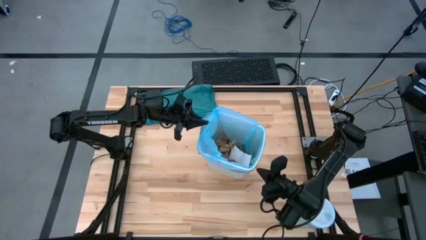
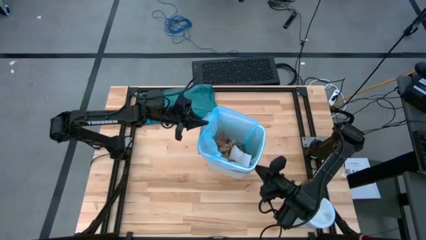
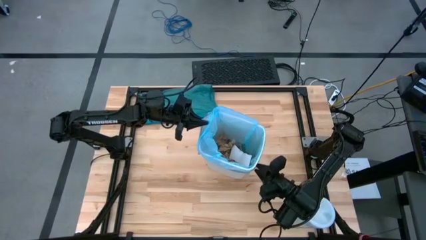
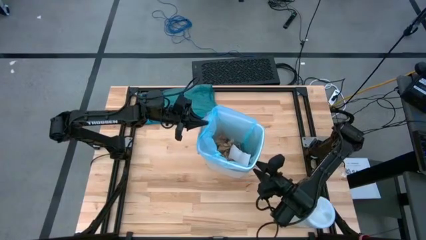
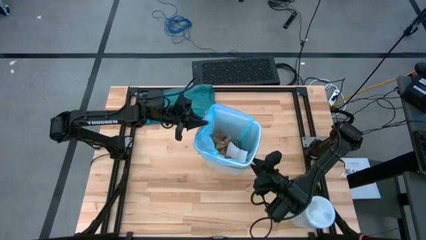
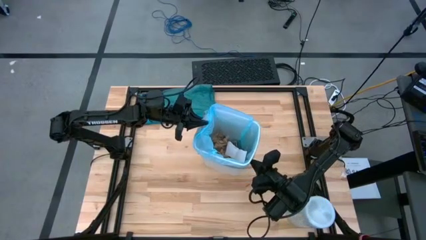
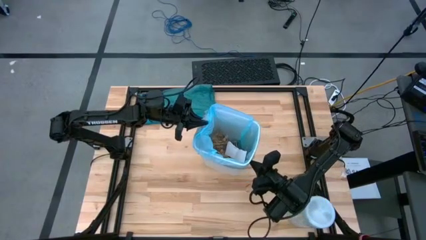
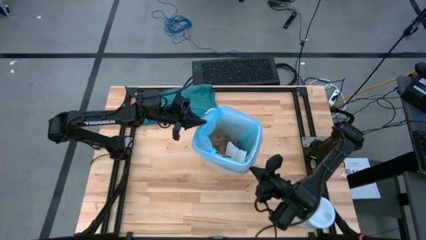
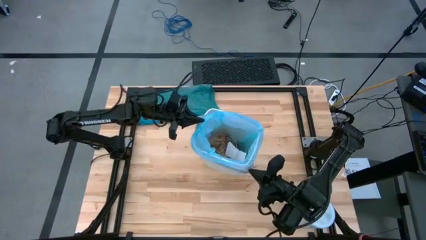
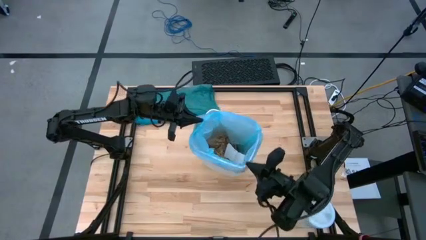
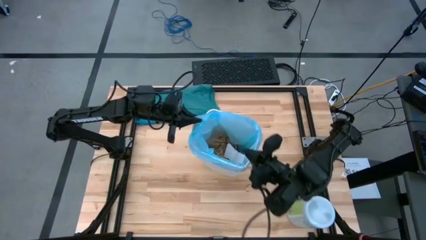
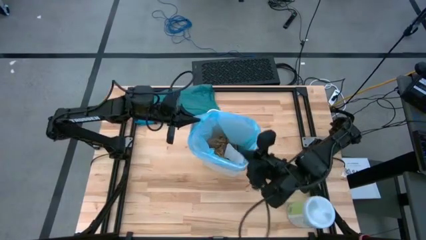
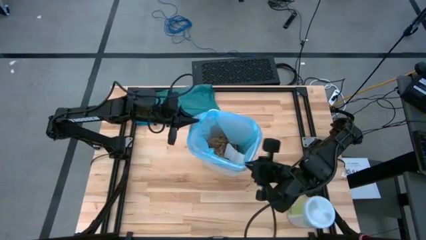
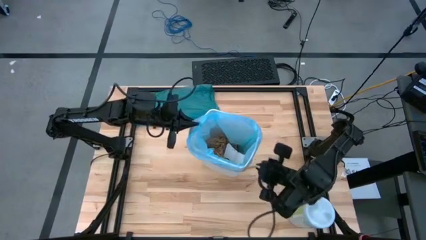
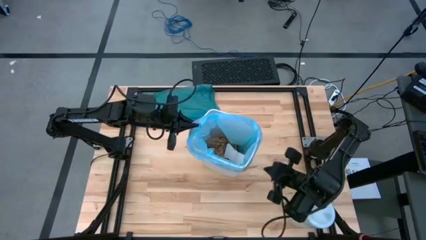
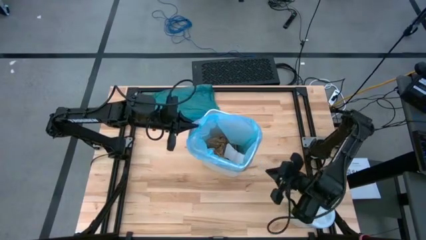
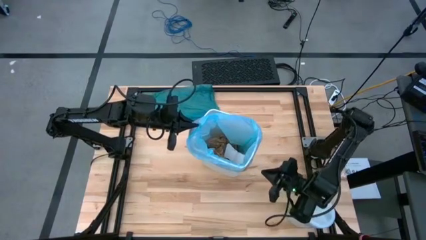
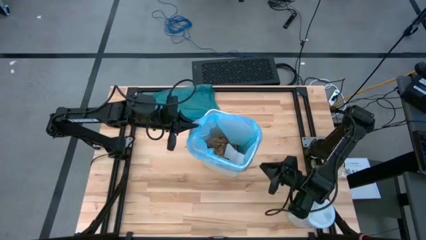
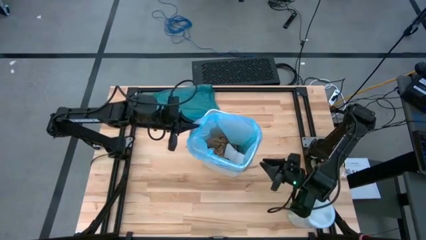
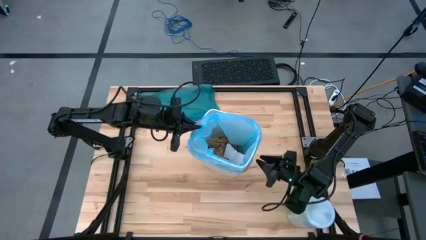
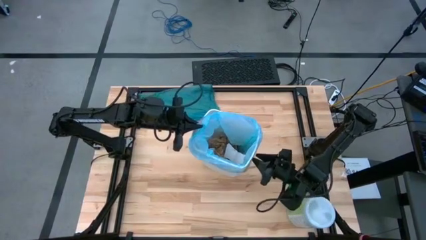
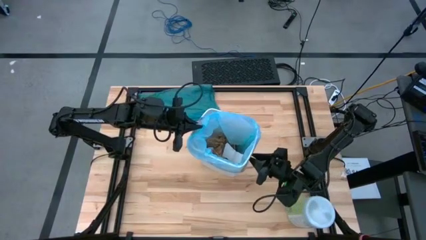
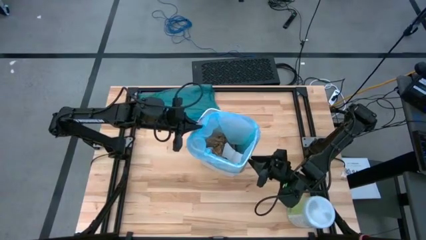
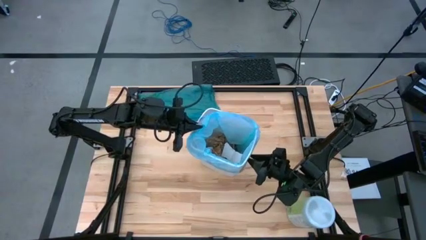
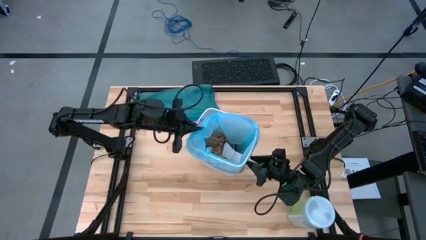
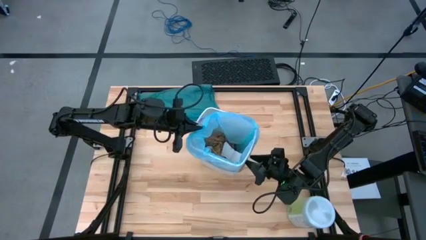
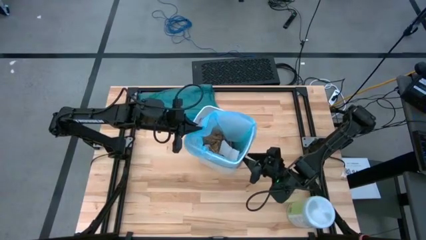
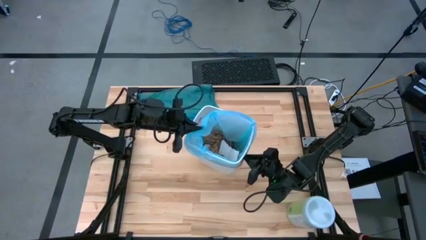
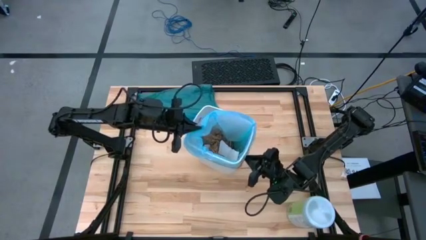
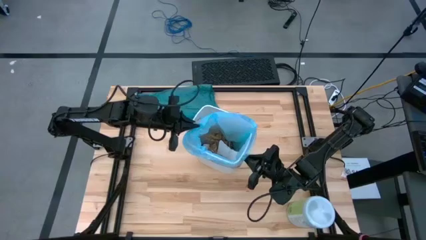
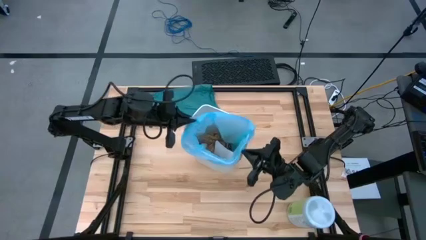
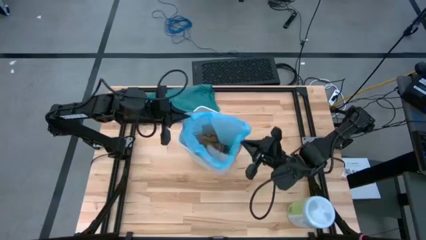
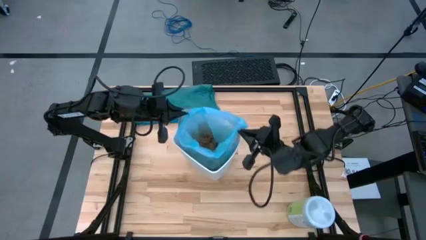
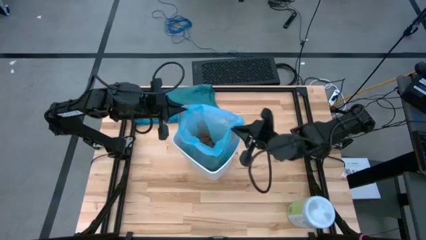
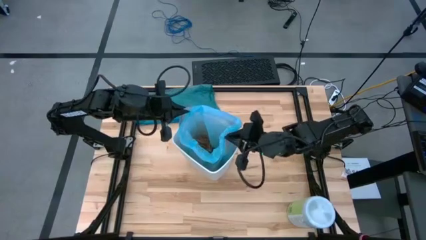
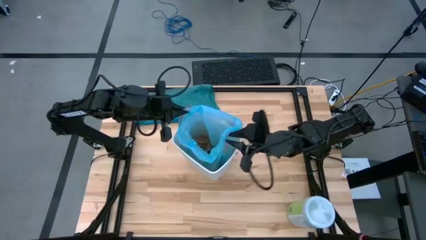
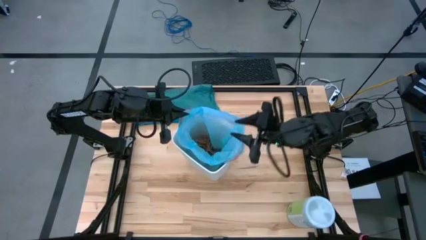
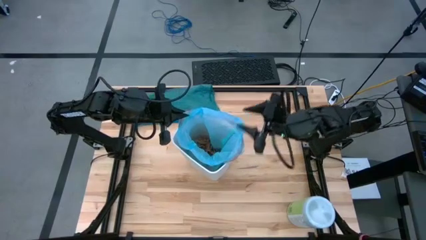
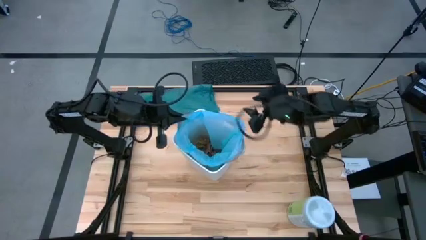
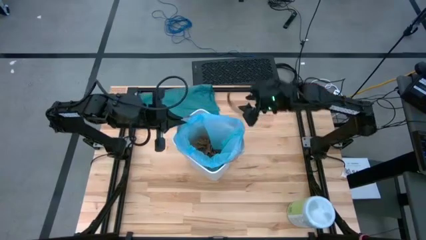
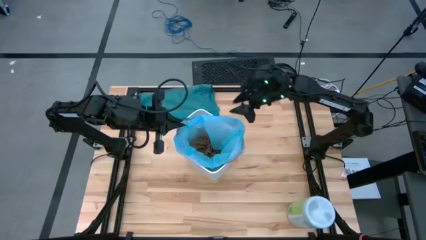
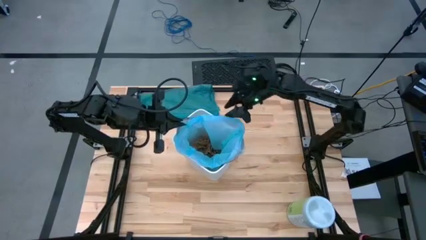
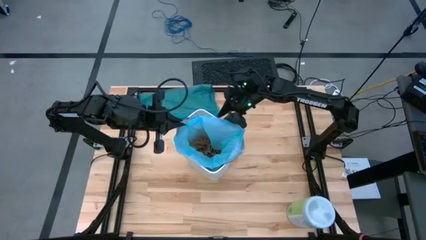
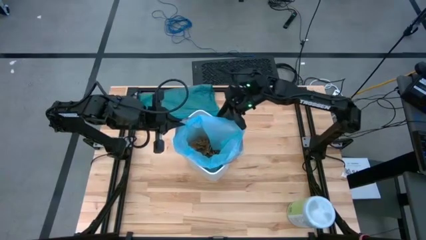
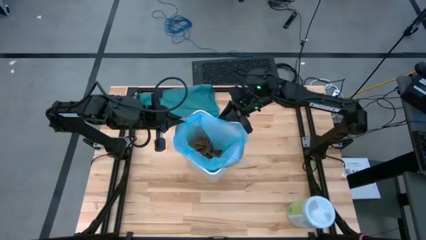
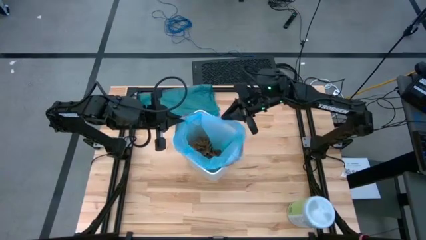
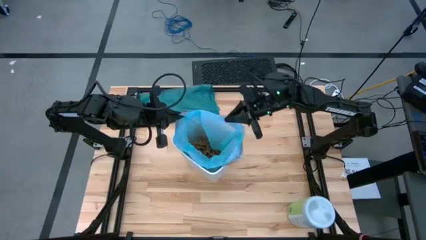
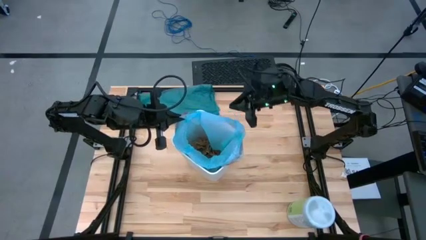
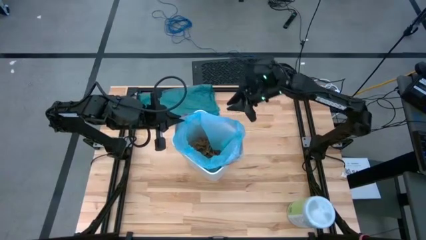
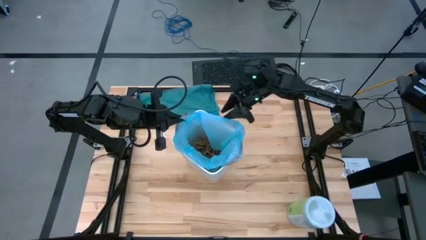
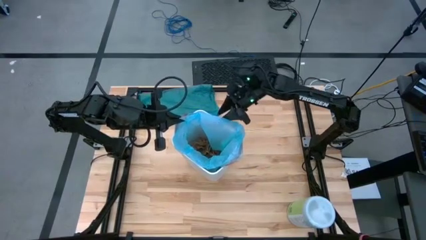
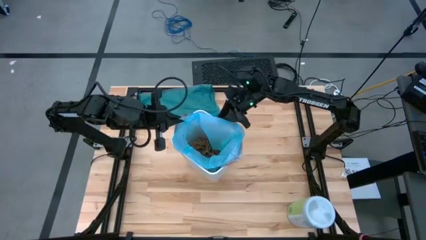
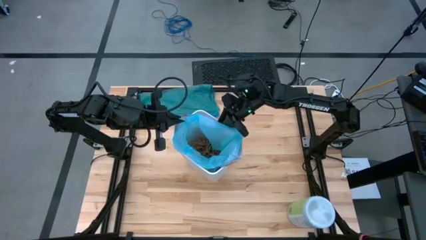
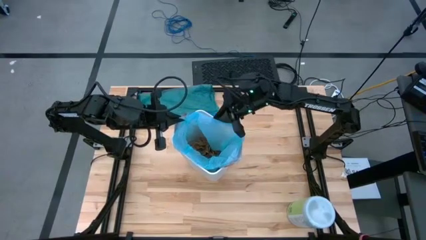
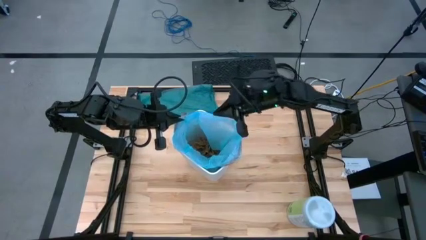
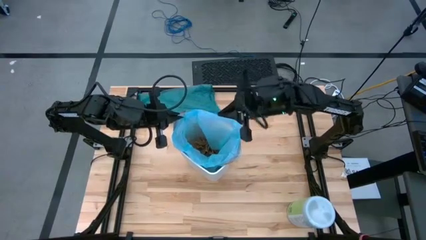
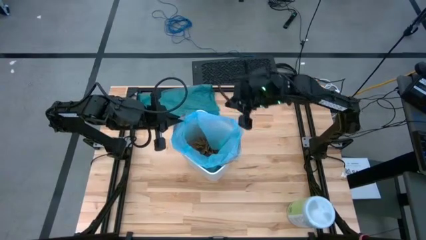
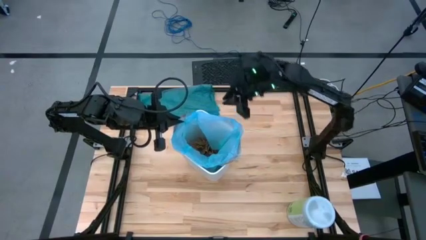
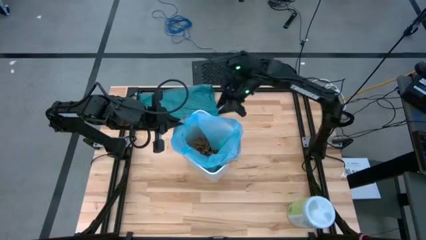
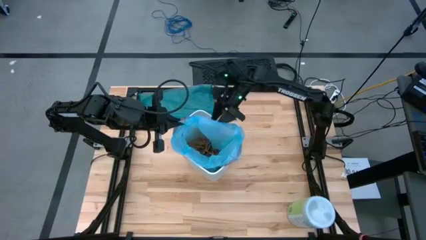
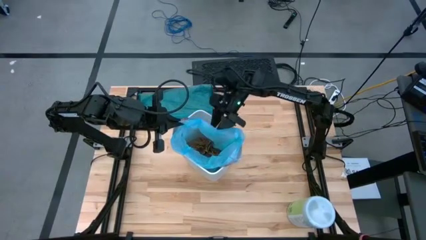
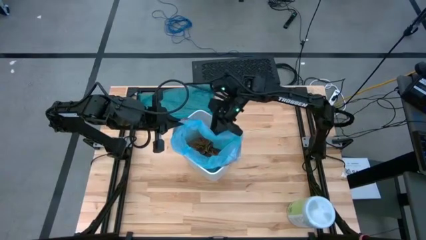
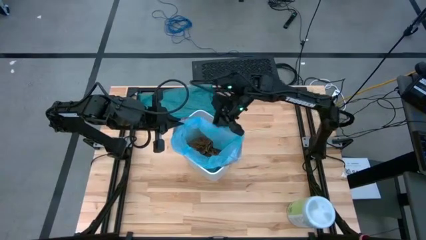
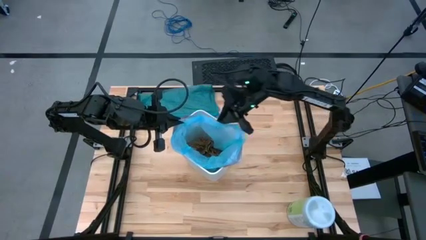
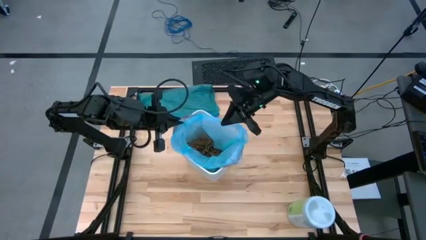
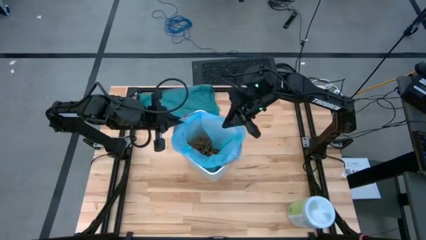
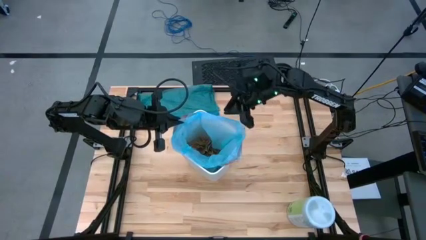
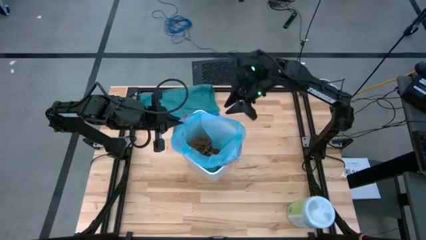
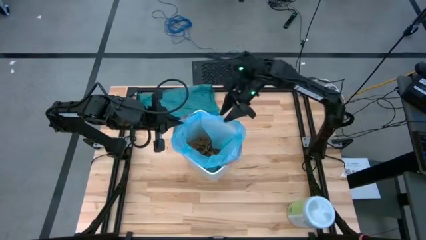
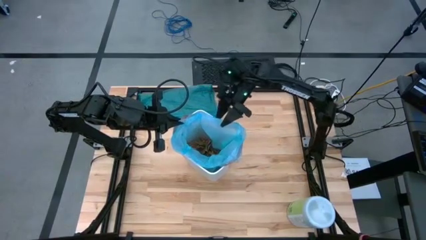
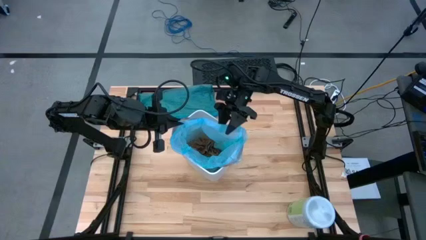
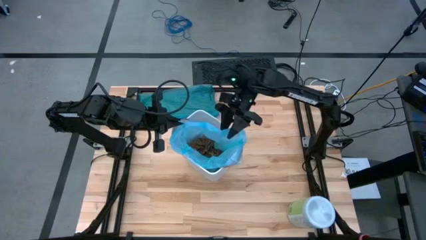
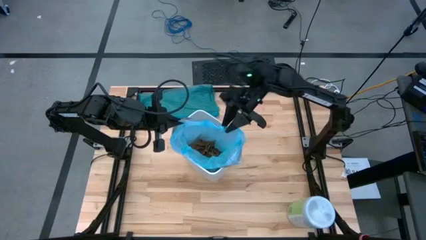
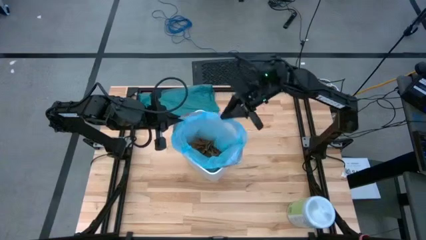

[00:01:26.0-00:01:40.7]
Task: place trash/remove bag and relplace
Remove the blue trash bag from the bin

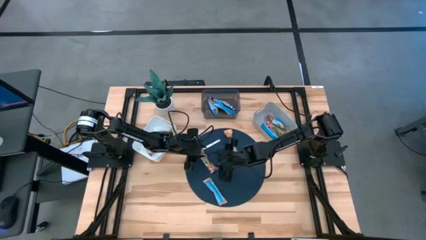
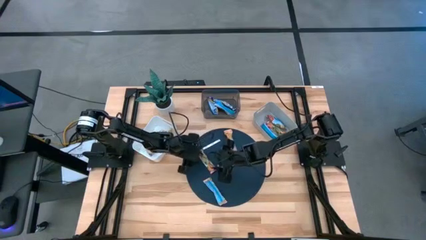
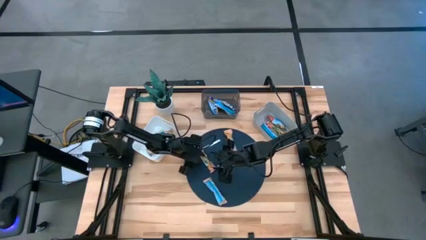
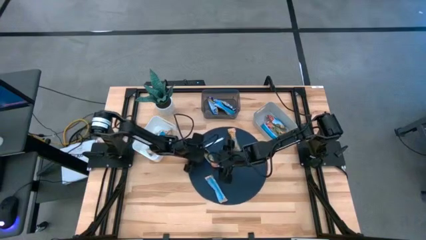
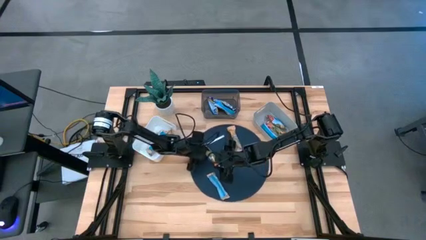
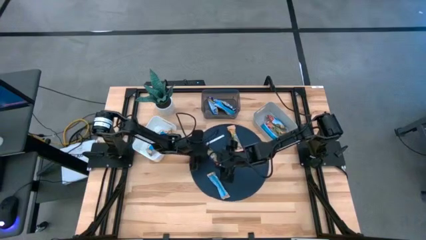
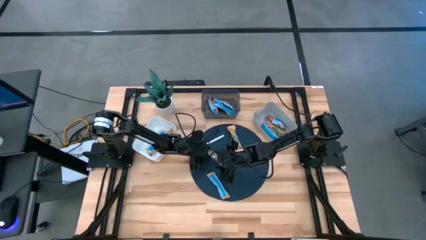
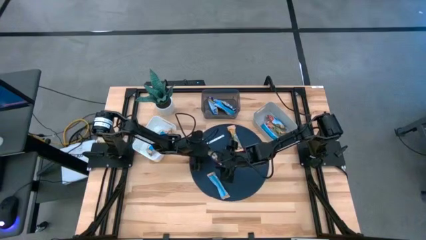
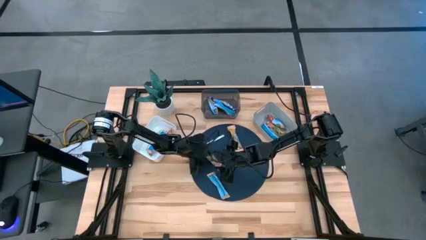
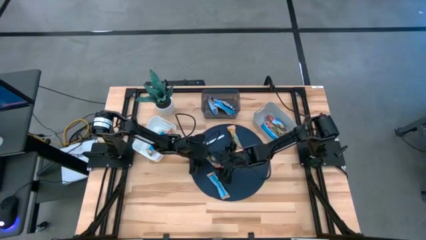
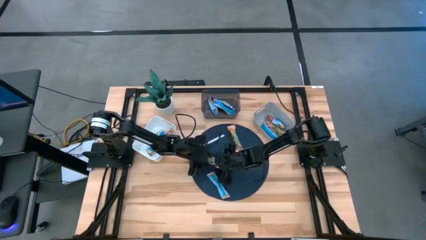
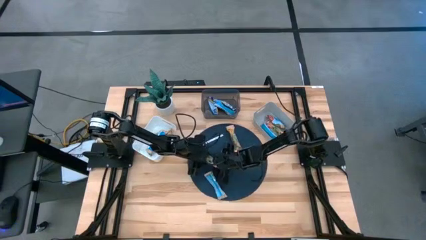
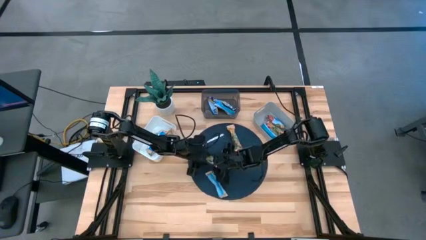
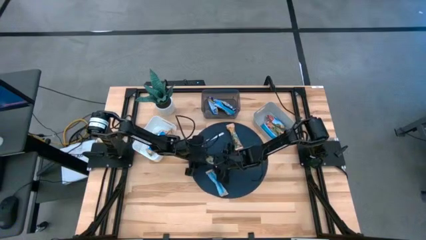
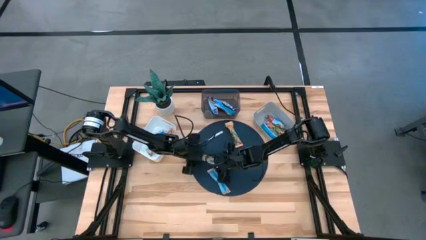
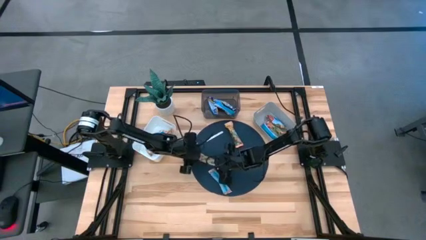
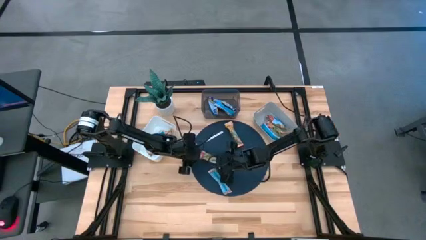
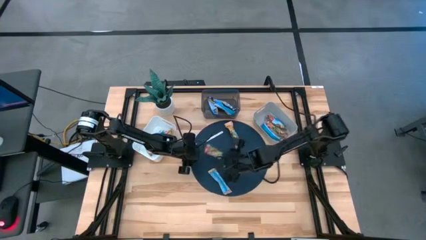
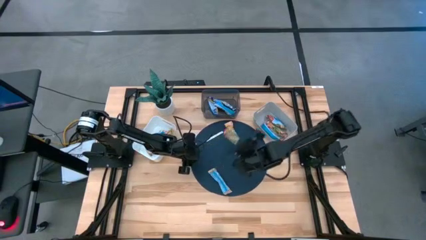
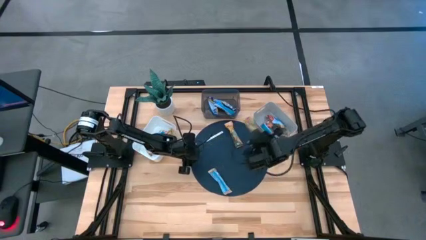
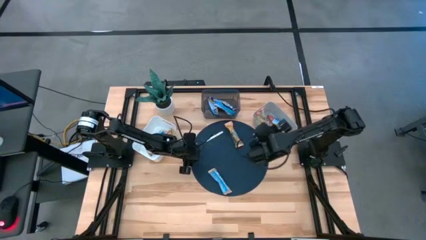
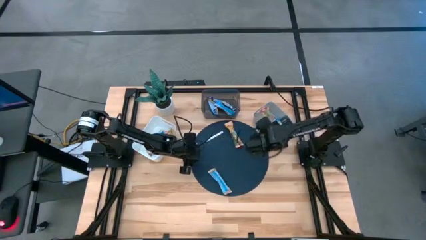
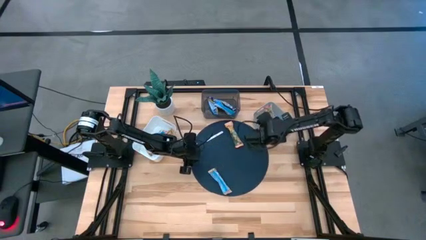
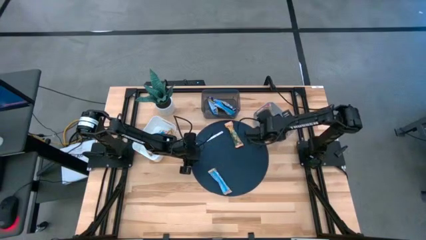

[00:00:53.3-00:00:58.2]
Task: Pick and place Granola Bars by type
Put the red granola bar into the gray bin
